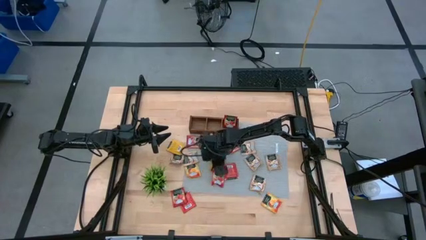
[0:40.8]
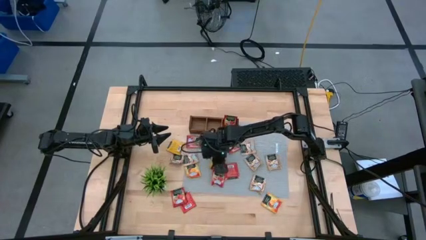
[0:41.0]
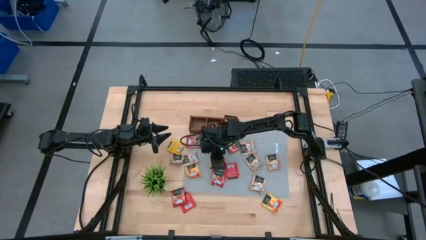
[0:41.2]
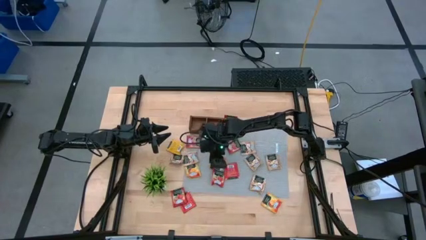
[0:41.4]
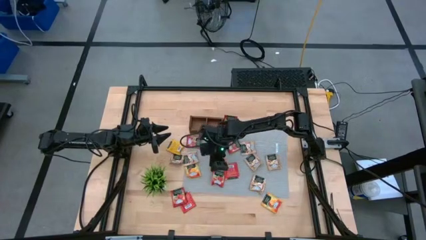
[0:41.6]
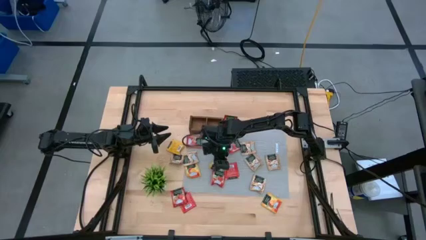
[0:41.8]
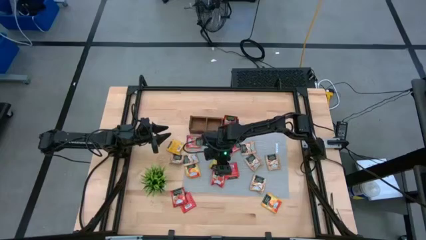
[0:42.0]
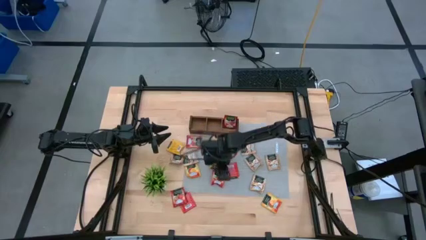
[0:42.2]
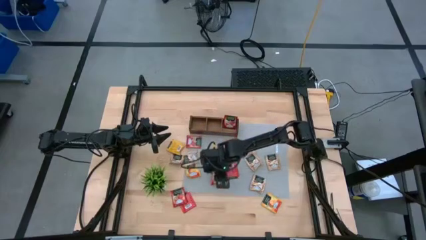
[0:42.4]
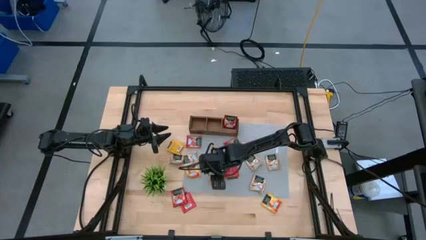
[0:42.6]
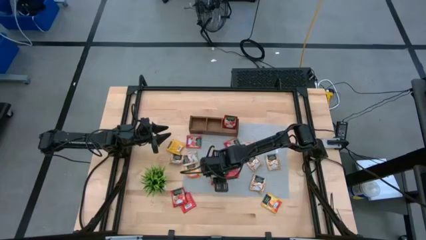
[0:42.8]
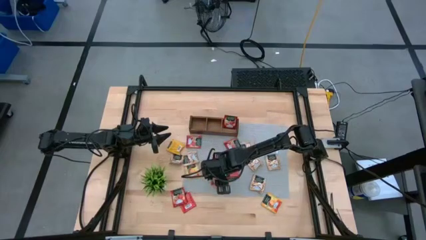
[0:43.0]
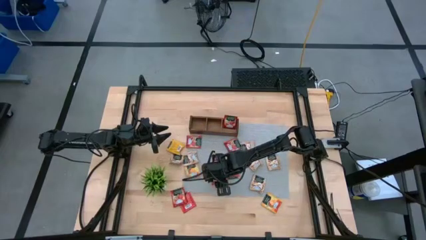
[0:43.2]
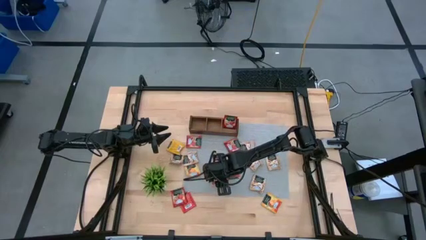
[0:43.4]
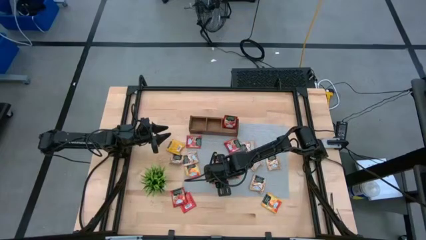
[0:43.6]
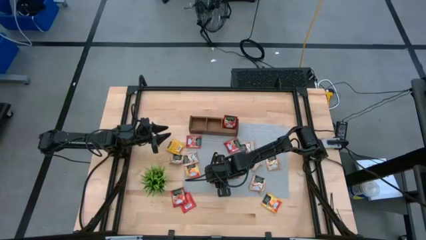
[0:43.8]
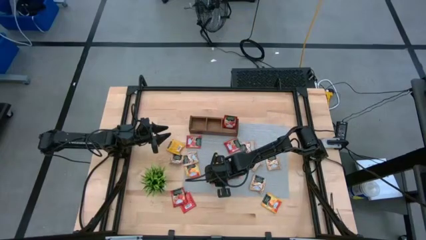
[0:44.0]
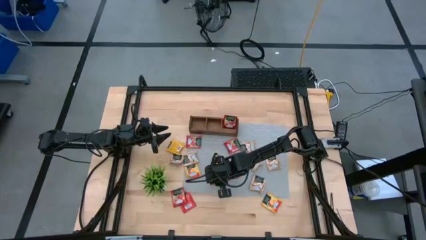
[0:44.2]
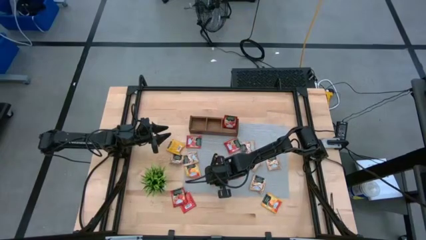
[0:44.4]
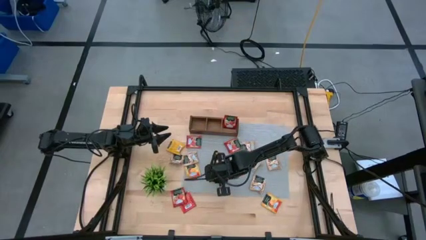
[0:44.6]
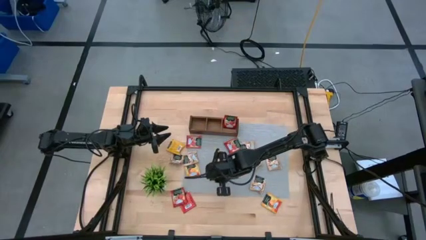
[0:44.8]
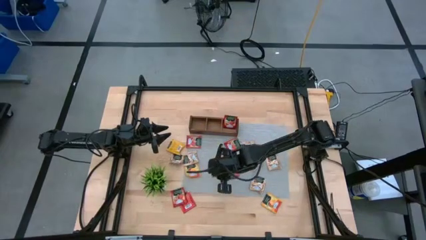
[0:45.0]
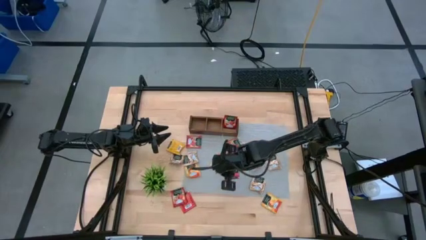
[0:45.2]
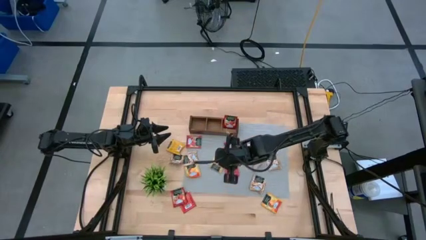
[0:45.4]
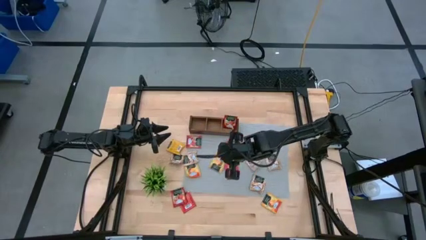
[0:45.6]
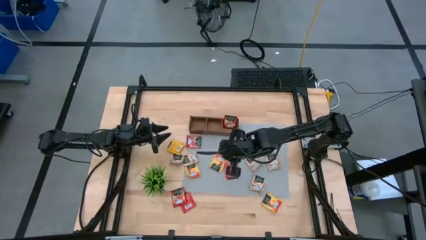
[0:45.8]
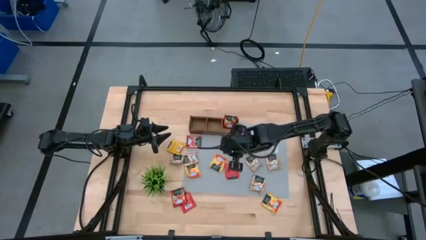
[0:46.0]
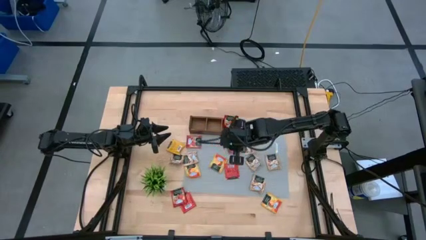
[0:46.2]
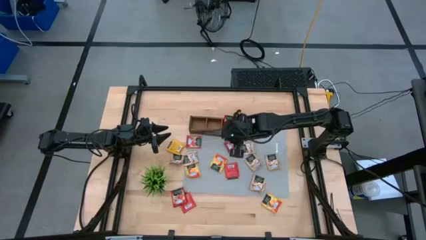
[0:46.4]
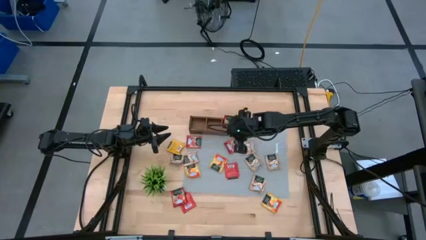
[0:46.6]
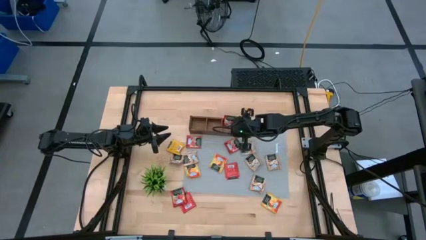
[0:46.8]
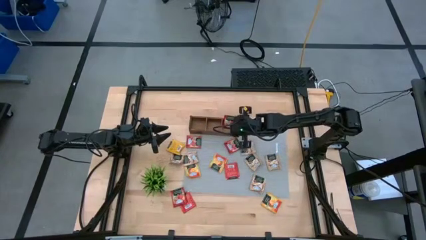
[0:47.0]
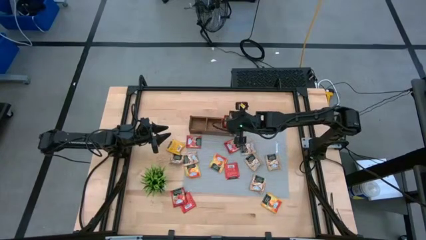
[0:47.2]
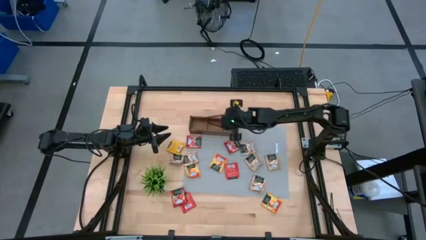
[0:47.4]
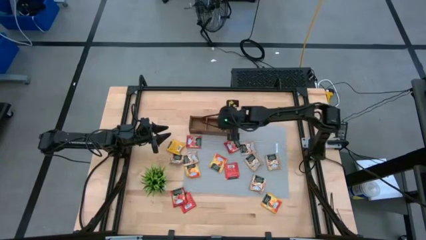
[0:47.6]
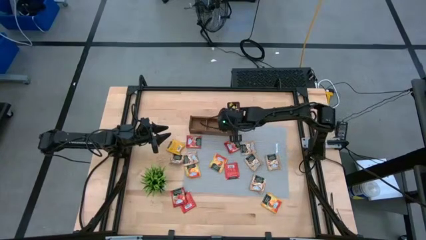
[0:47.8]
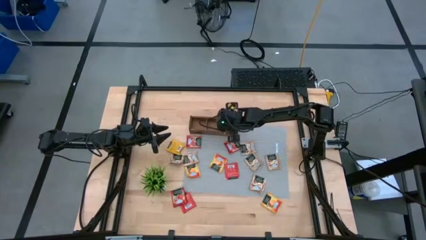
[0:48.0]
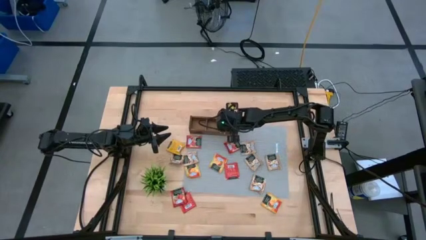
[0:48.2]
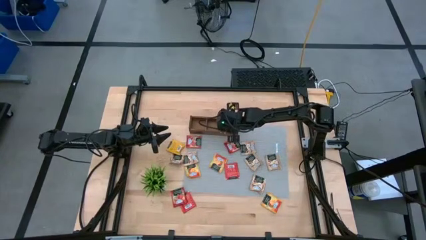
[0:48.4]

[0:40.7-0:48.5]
Task: Pick & Place Tea
Put the red tea bag into the right section of the wooden organizer

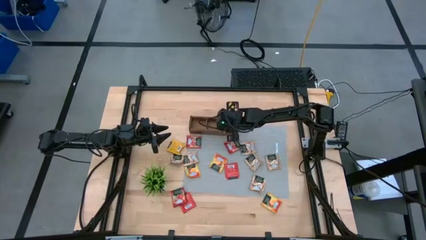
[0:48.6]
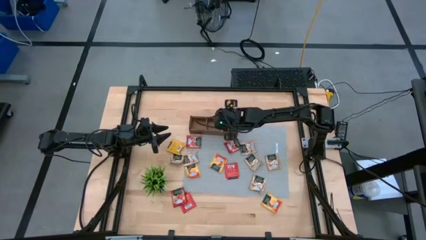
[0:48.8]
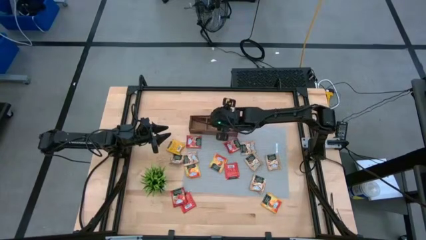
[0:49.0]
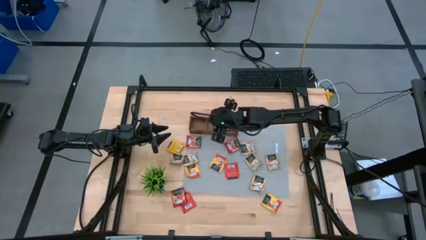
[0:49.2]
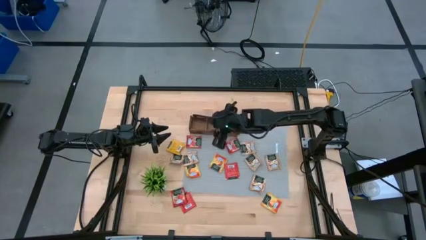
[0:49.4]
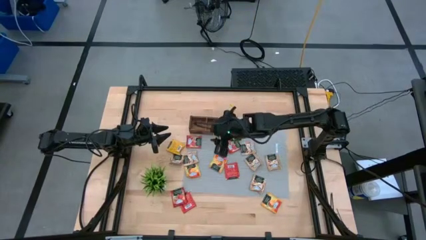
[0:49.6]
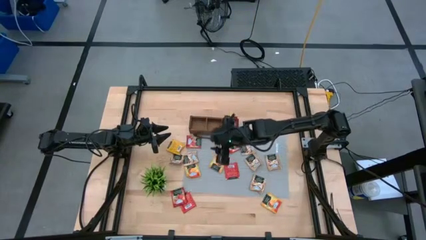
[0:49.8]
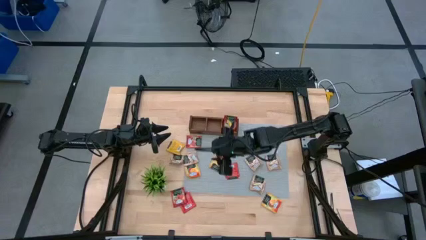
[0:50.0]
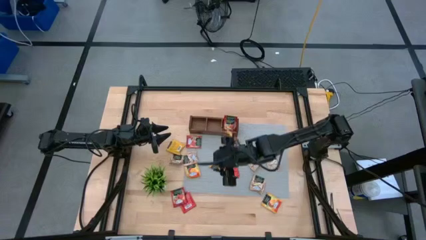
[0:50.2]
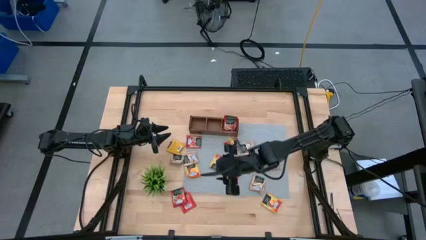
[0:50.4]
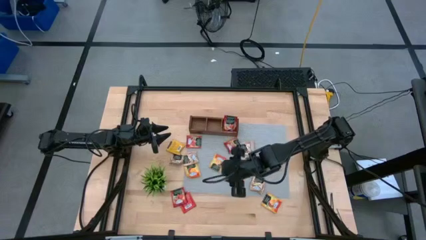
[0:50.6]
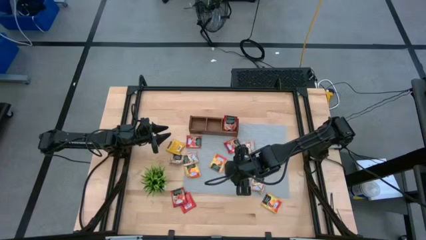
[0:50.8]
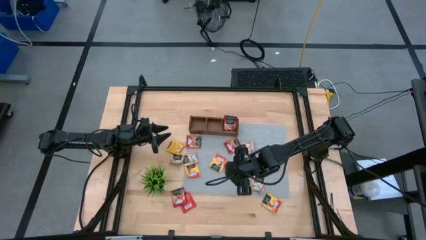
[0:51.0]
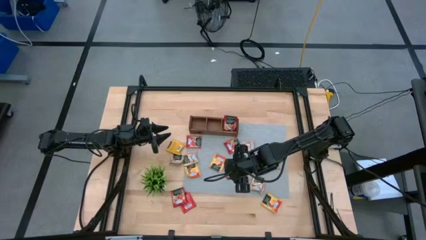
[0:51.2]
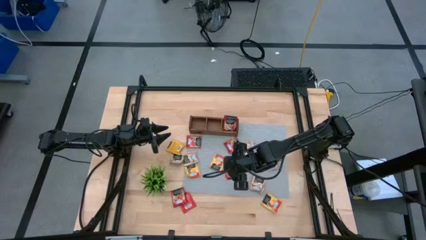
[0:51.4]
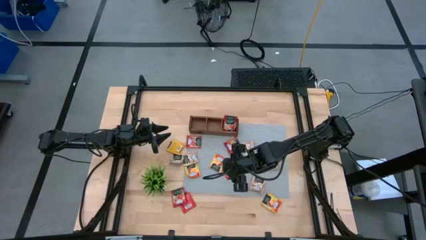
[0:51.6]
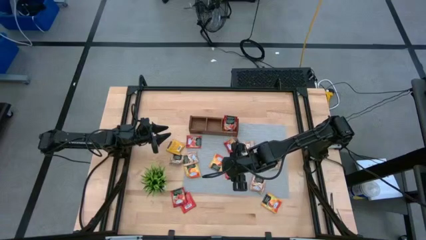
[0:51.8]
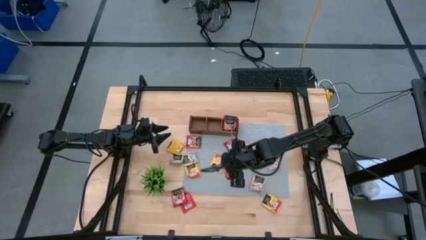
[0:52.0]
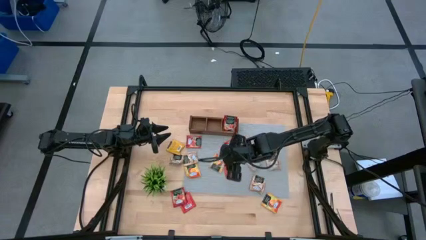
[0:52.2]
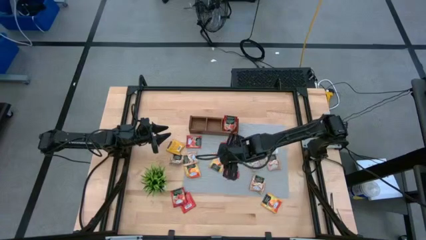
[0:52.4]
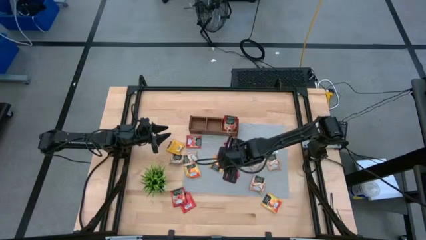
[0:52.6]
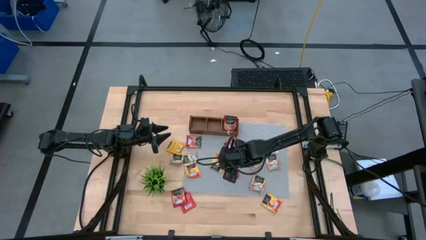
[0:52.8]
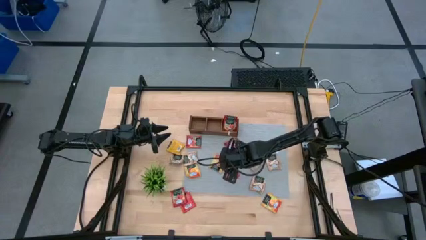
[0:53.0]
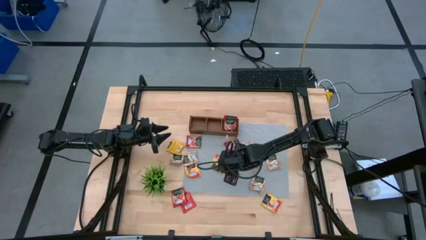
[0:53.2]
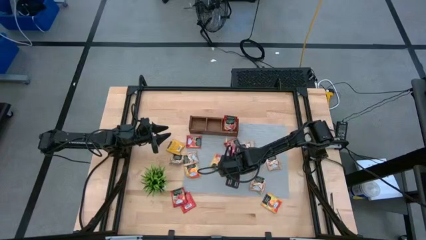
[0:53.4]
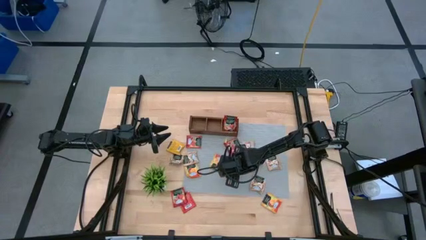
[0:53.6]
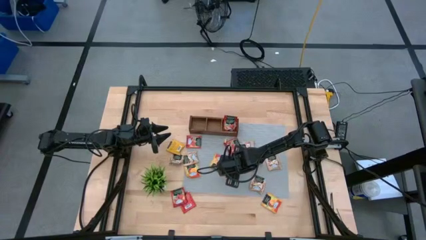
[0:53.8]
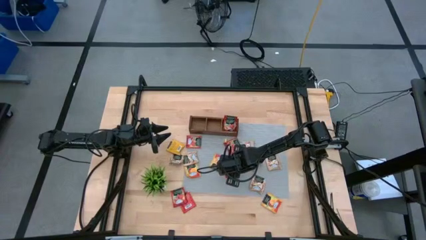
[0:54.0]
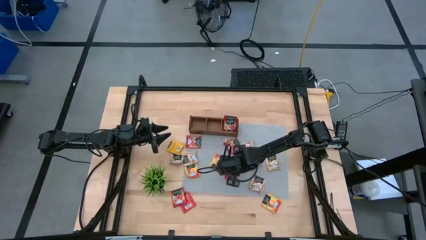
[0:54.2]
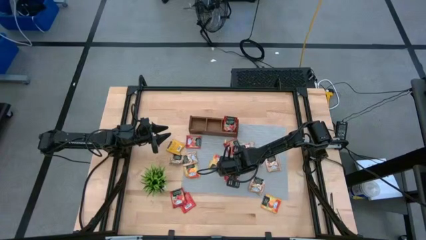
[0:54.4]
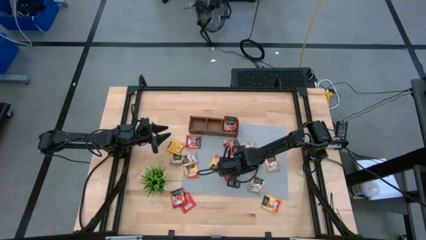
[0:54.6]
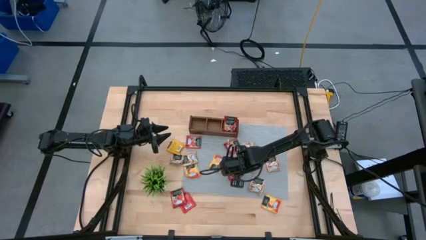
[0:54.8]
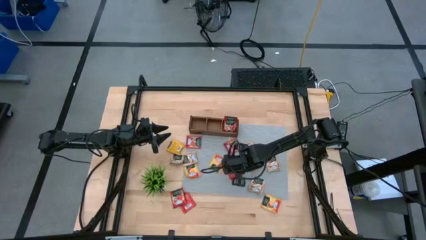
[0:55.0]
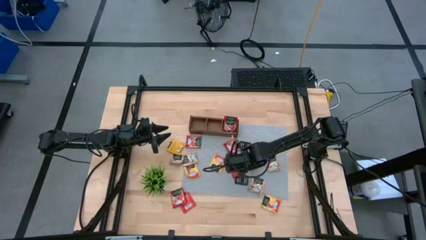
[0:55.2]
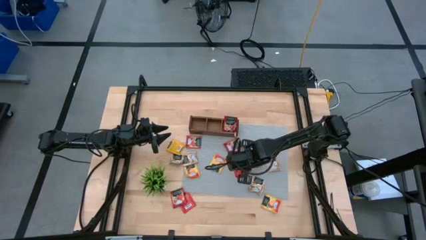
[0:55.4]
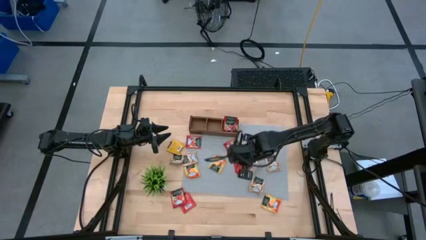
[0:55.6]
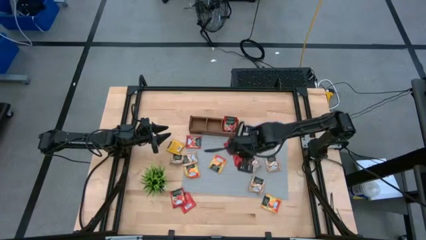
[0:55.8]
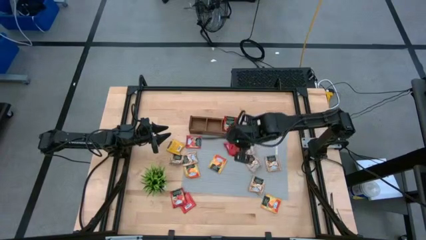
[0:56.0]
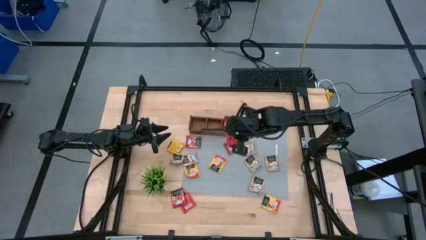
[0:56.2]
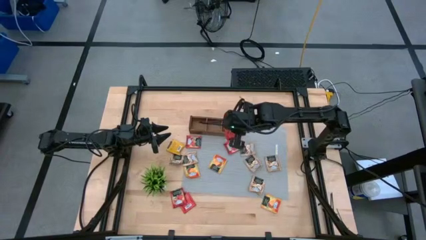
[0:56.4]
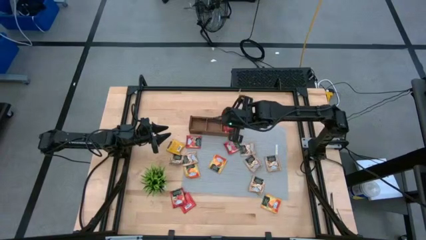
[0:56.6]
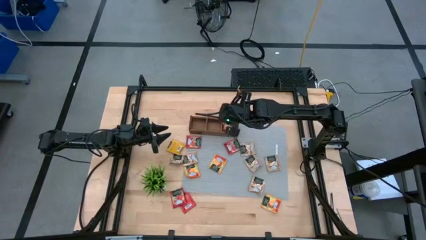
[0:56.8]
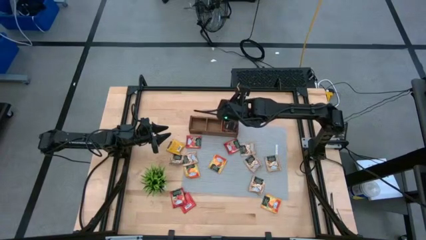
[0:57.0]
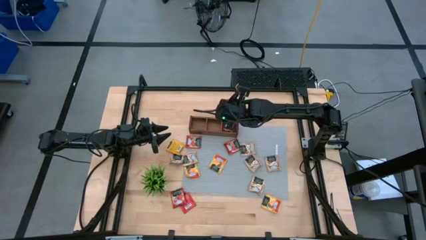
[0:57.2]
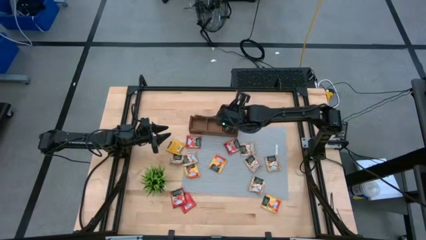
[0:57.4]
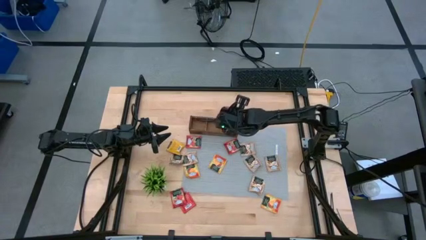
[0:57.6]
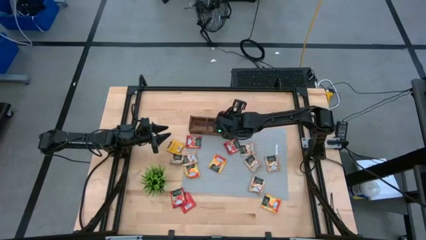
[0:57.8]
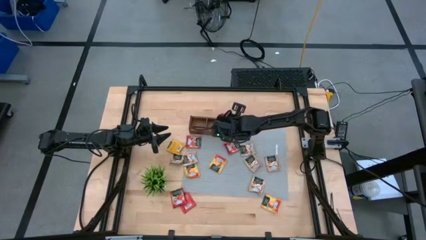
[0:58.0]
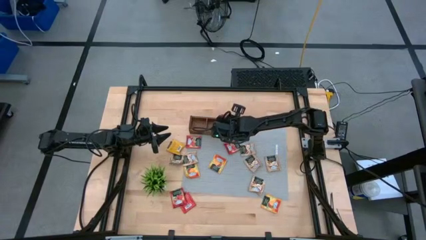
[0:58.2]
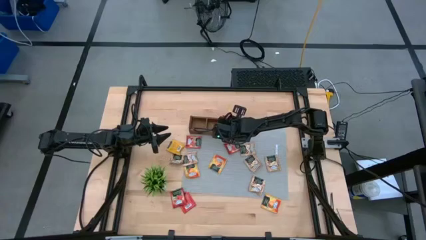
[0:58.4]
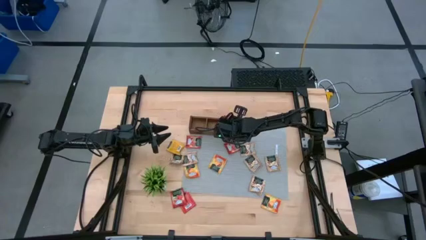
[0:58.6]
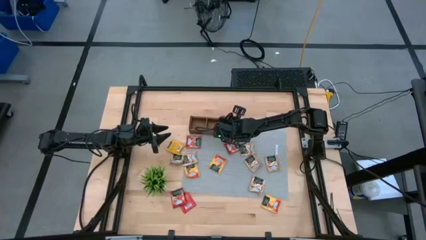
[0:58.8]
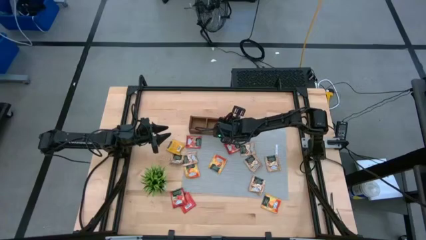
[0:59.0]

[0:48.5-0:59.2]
Put the red tea bag into the right section of the wooden organizer
